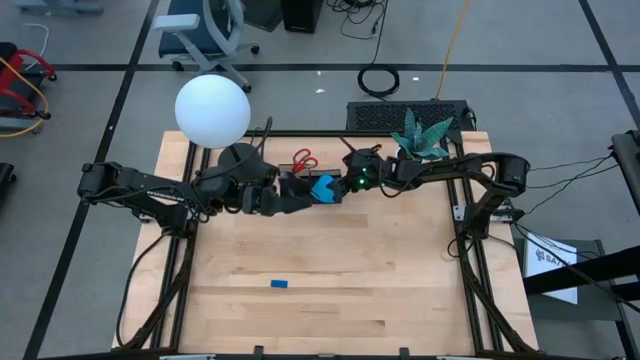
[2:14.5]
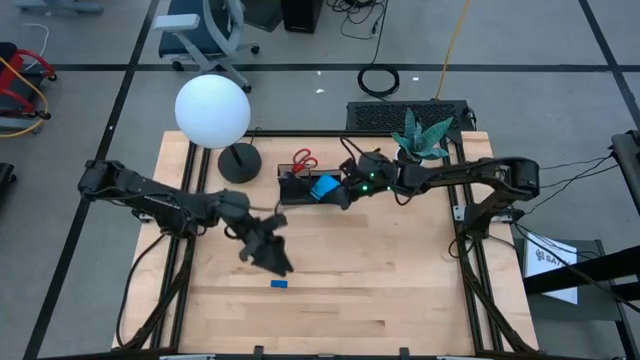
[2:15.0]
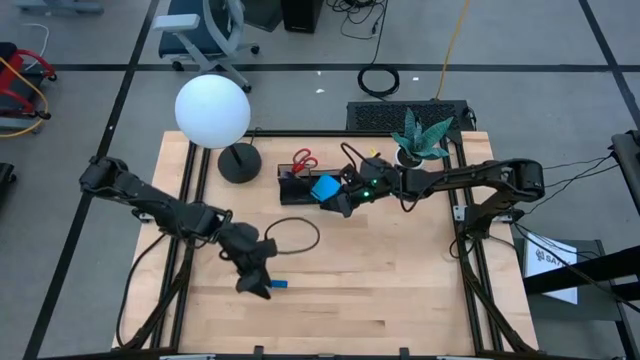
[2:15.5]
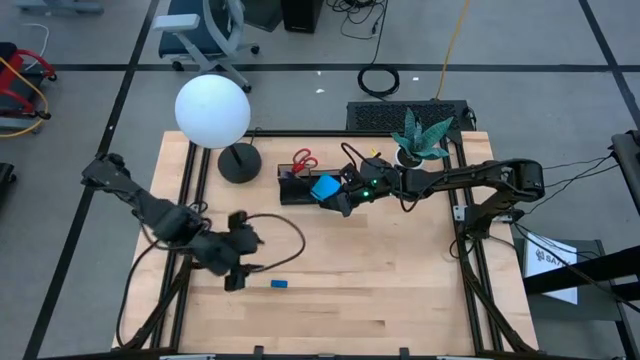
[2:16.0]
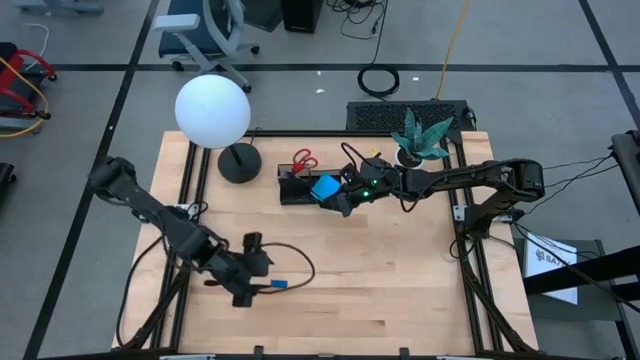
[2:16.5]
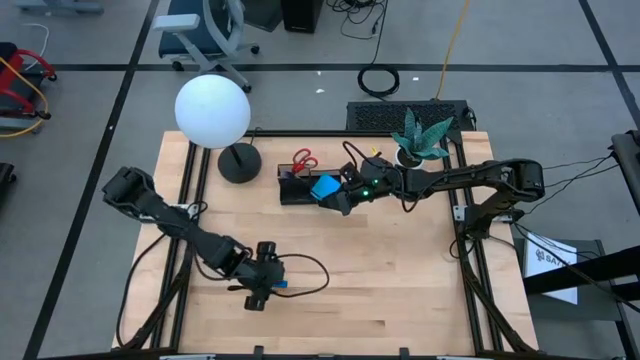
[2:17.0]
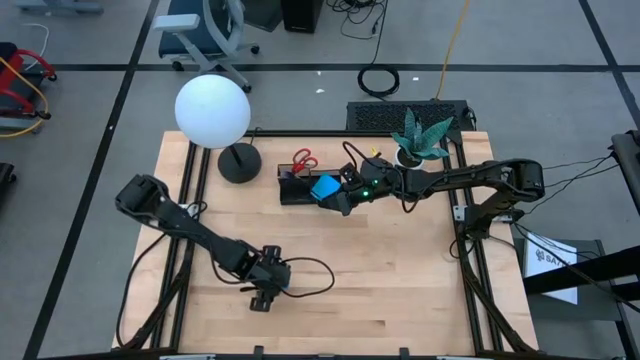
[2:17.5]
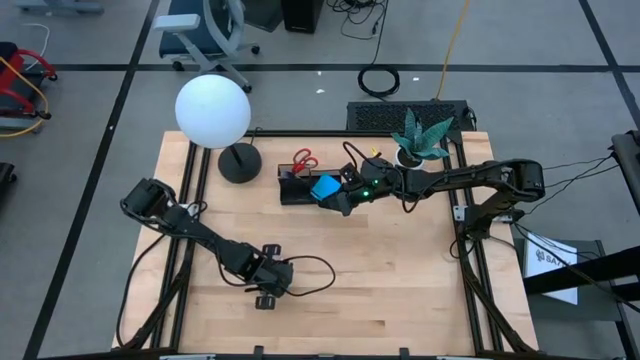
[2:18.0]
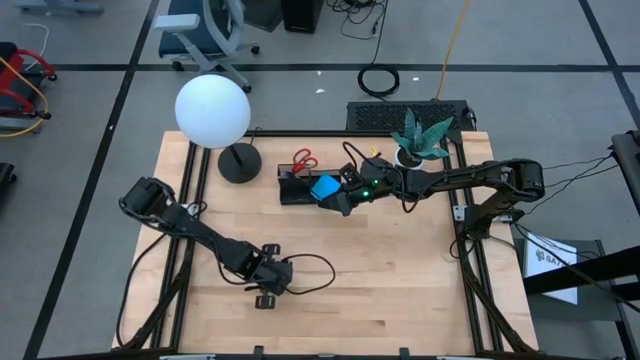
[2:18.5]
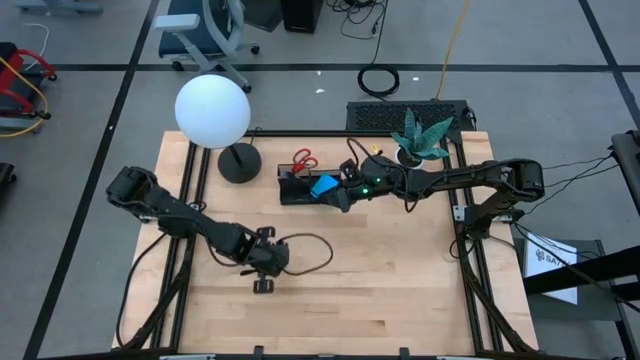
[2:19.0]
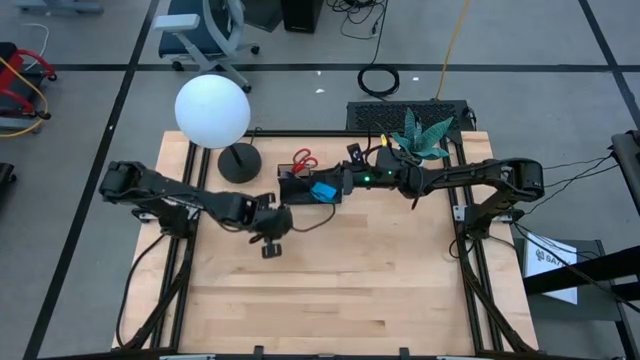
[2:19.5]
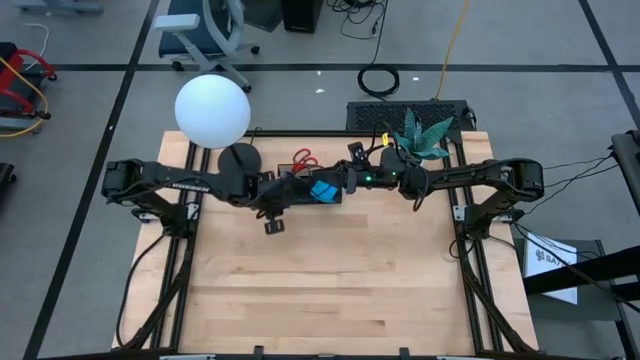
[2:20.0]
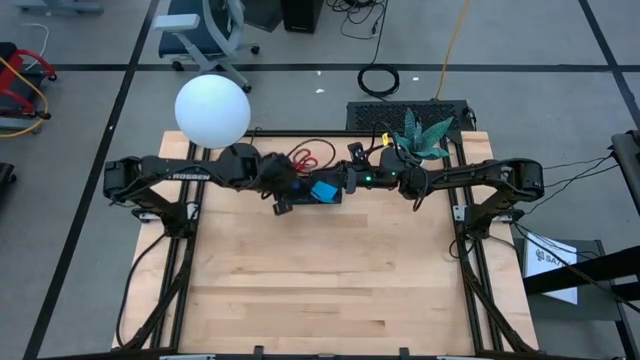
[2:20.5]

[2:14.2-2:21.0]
Task: Pick and place office supplies into organizer
Put the blue eraser into the desk organizer

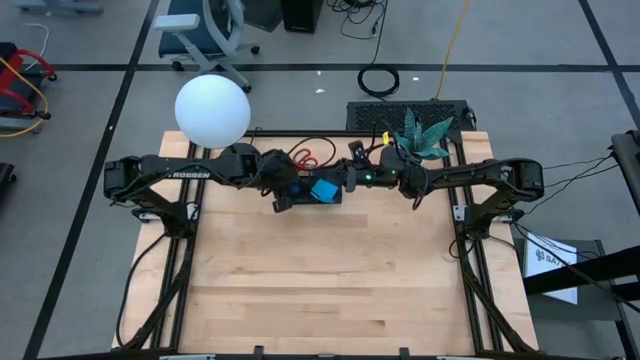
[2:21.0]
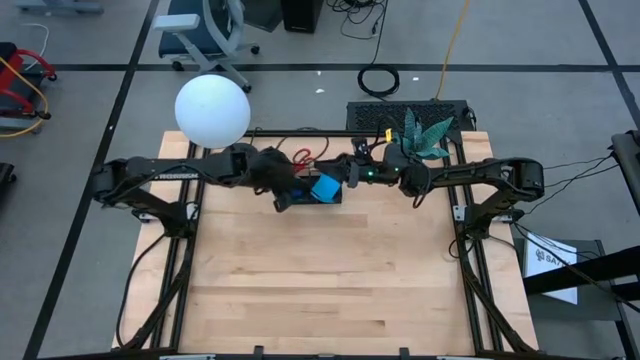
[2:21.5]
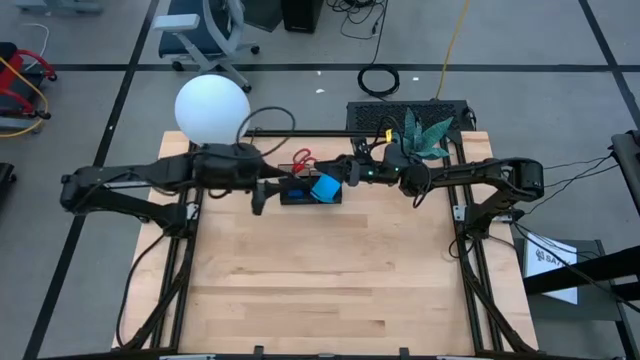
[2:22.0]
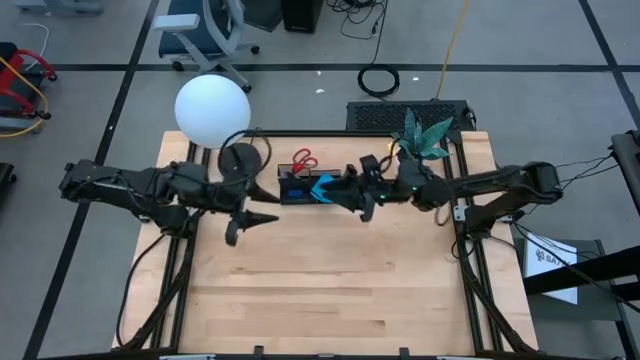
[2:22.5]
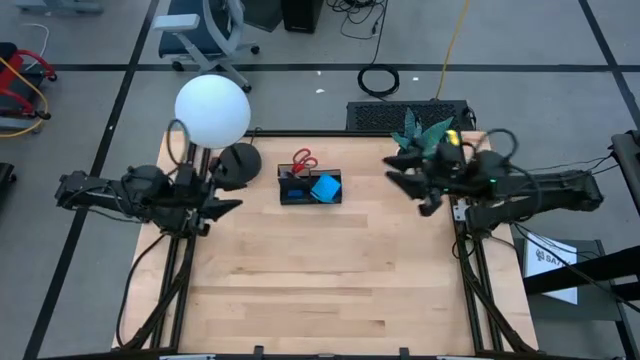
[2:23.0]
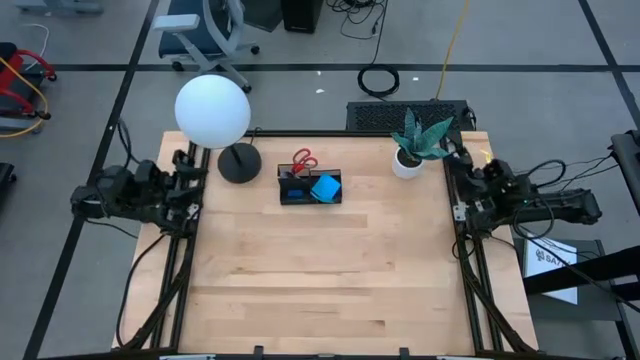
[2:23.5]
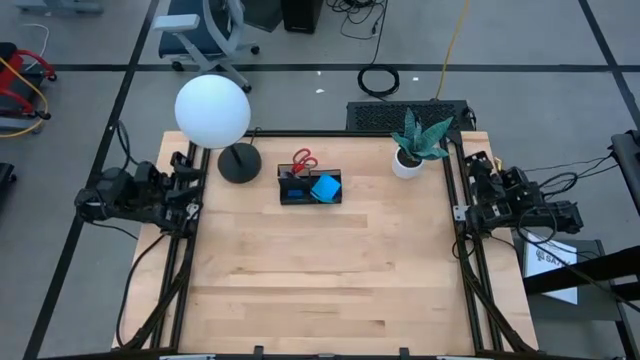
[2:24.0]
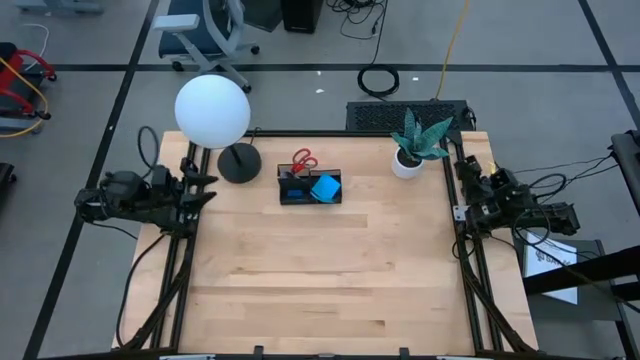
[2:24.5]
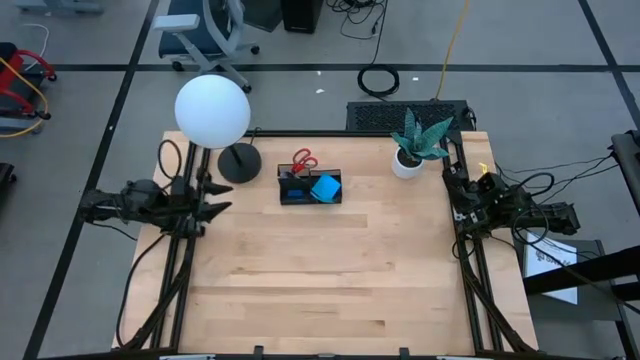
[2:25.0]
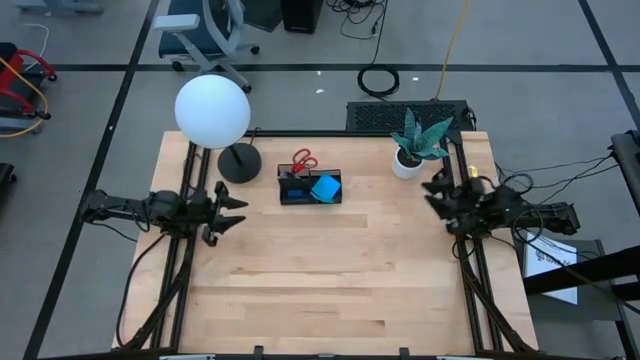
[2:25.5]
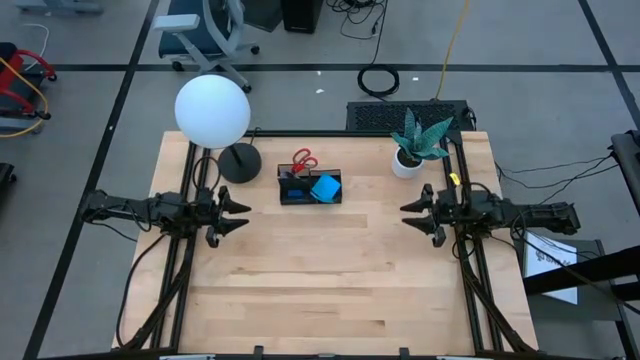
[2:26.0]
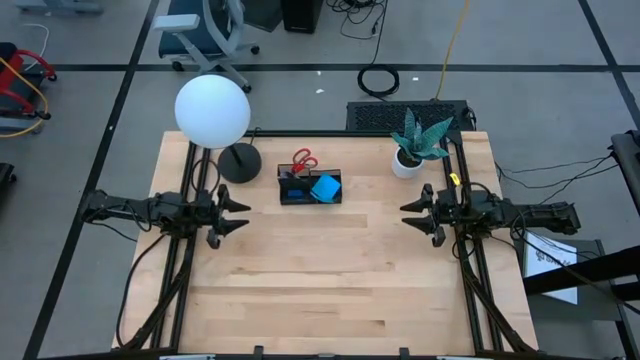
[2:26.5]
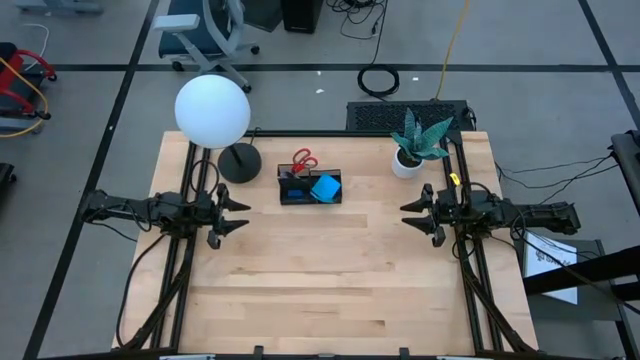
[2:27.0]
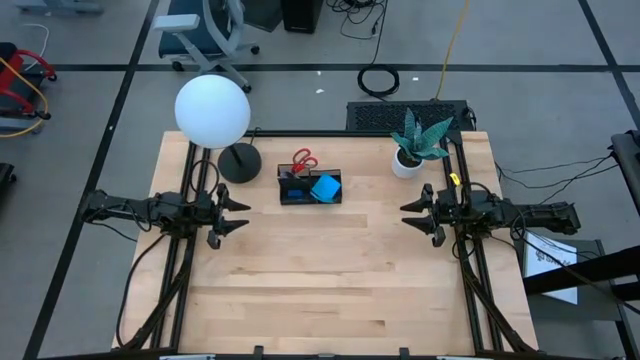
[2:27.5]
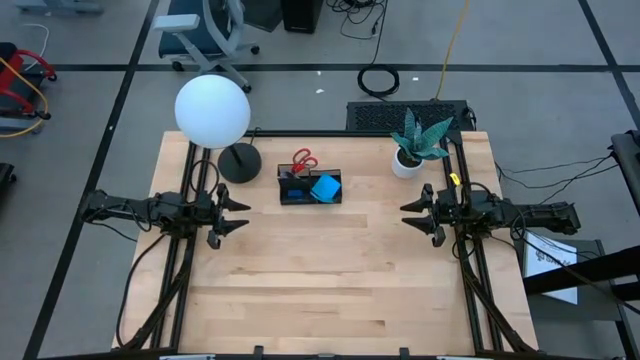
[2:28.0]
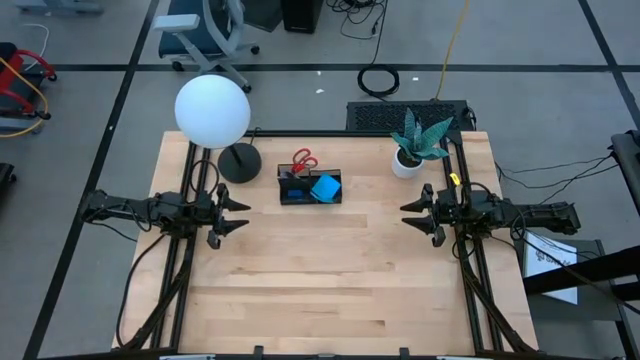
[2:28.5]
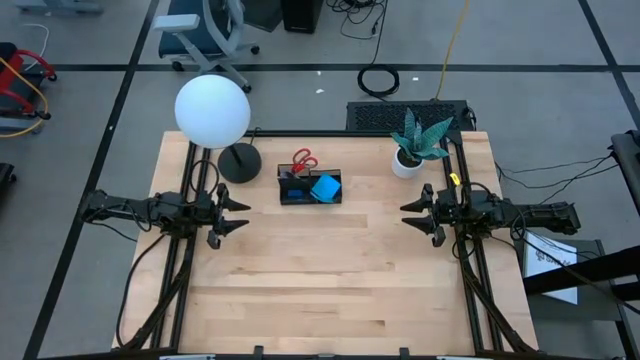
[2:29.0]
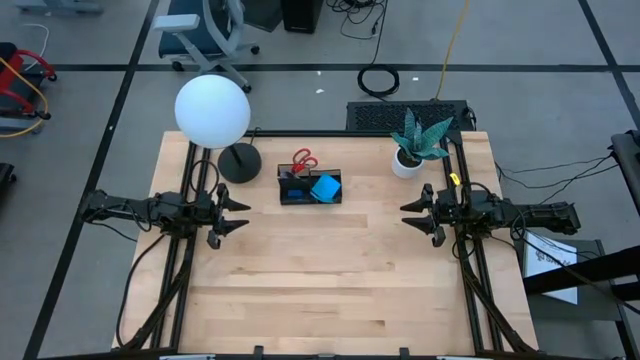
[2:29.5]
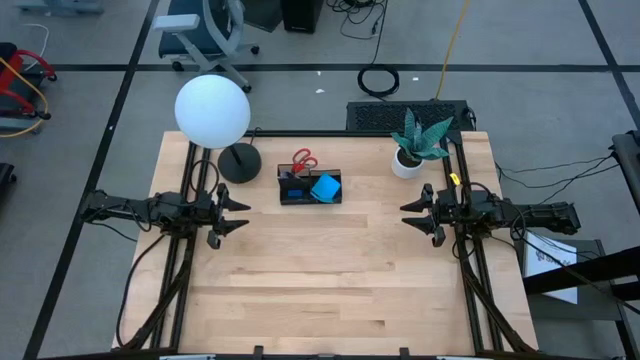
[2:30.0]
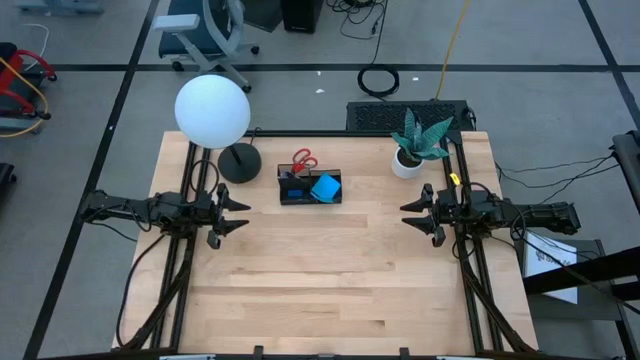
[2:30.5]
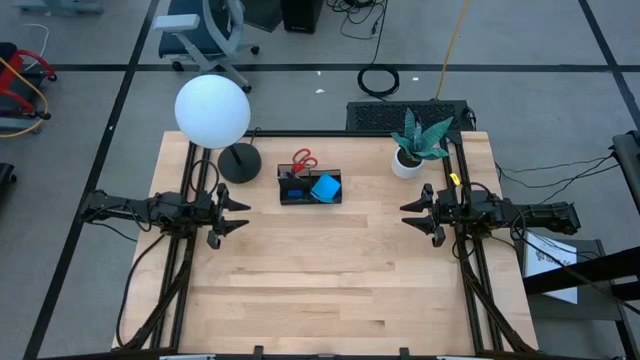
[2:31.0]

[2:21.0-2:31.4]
Return to Home Position

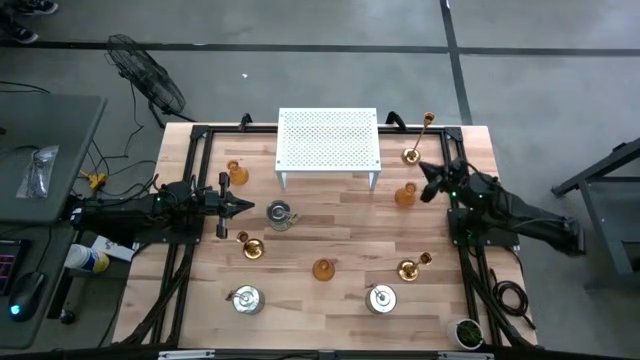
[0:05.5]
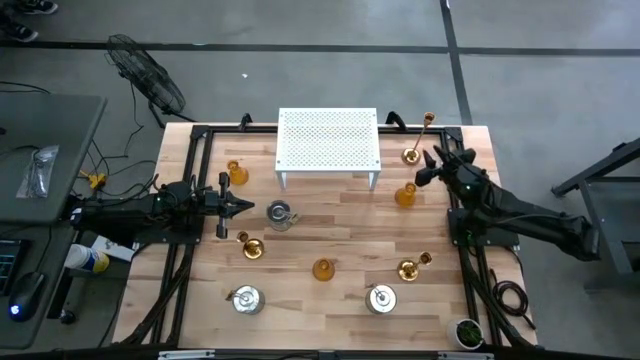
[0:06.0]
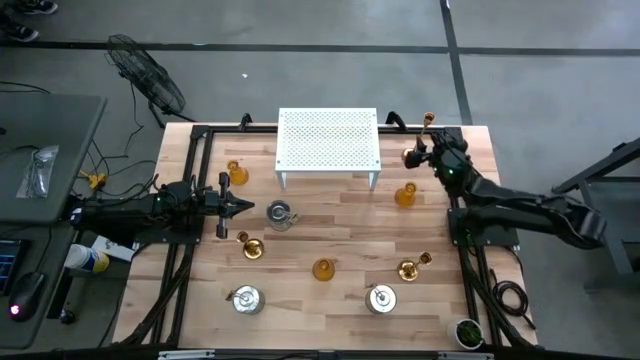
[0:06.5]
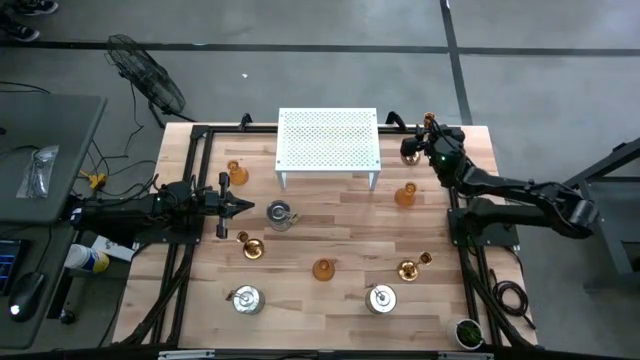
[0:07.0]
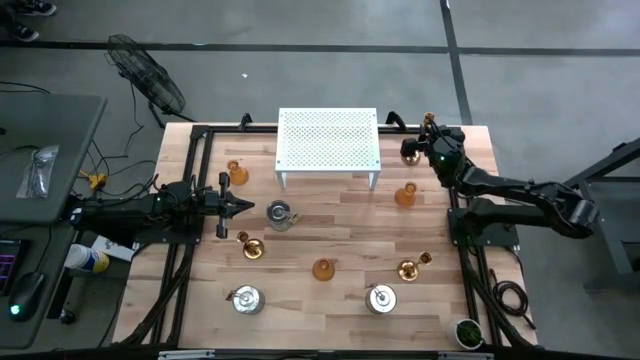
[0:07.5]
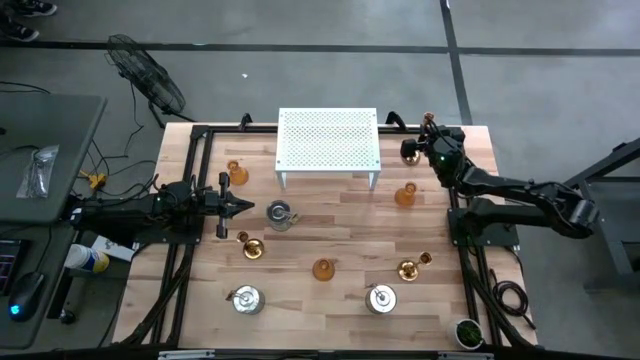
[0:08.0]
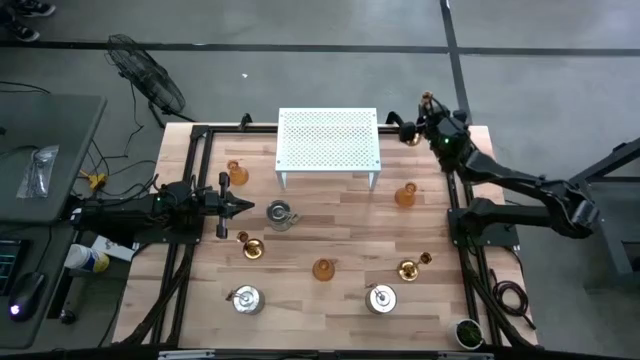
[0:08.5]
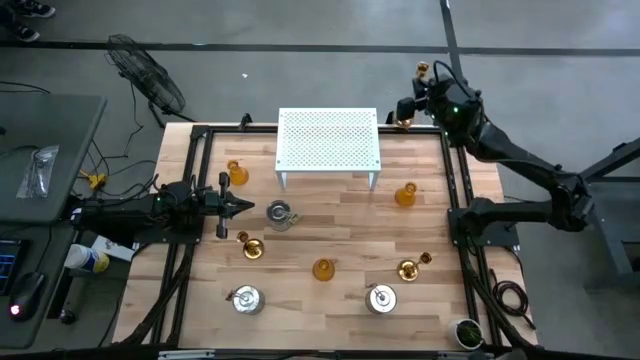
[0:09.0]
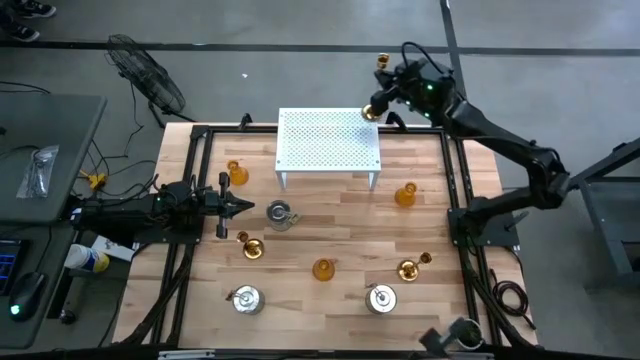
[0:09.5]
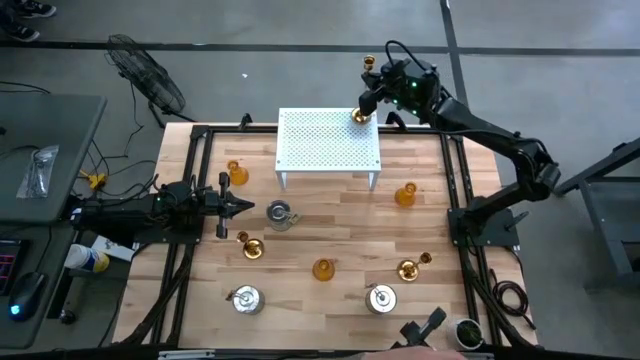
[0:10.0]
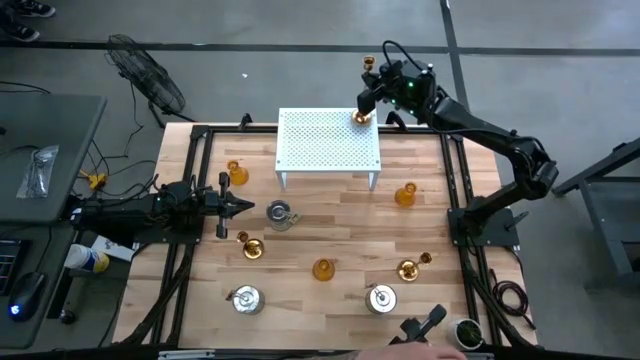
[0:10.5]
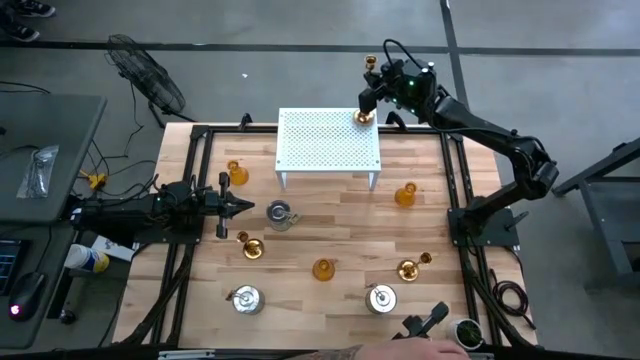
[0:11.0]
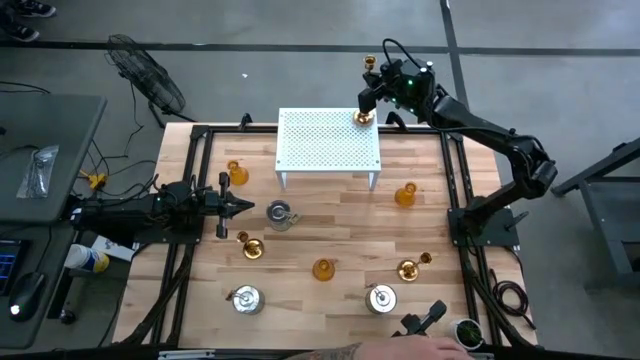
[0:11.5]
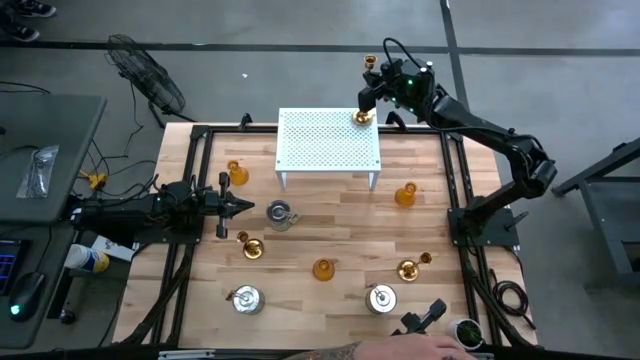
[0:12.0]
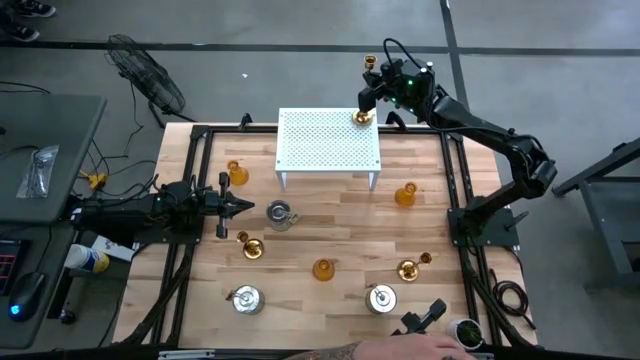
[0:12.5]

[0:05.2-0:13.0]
Task: Pick & Place candle stick holders
Put the top gold candle holder on the shelf
